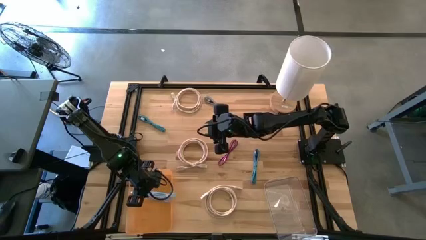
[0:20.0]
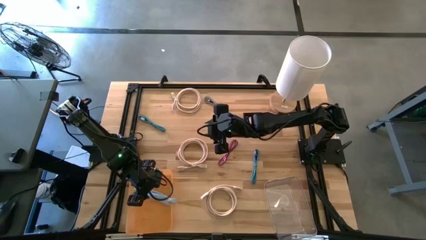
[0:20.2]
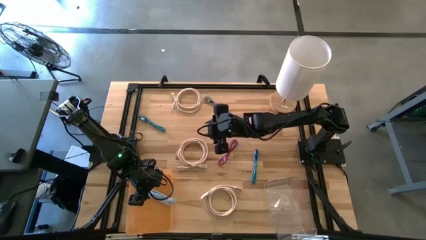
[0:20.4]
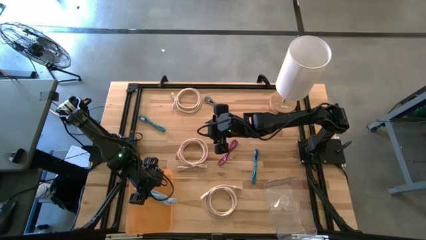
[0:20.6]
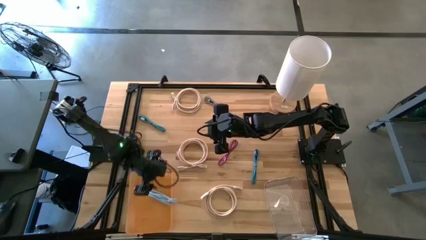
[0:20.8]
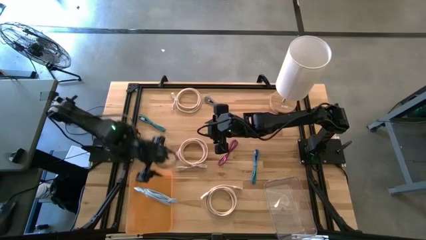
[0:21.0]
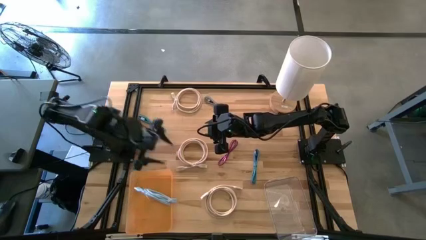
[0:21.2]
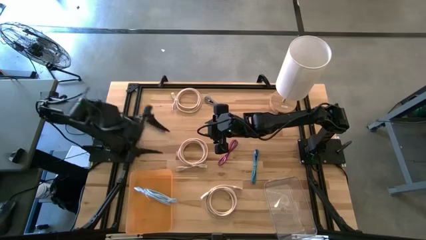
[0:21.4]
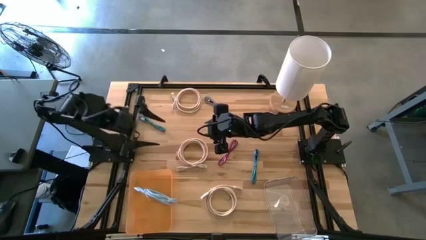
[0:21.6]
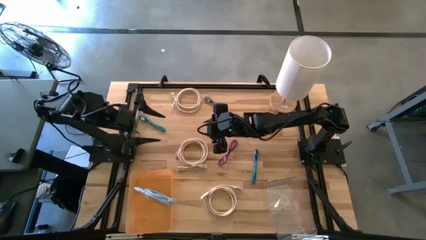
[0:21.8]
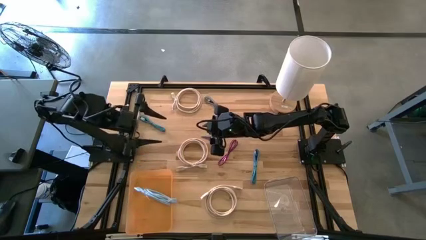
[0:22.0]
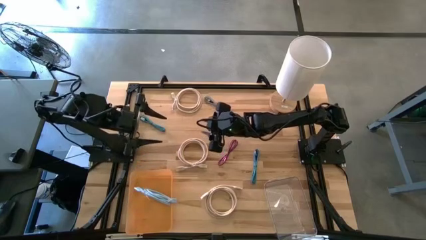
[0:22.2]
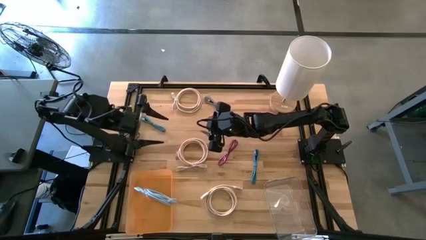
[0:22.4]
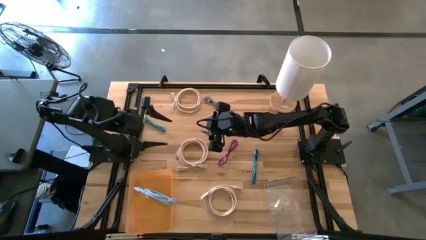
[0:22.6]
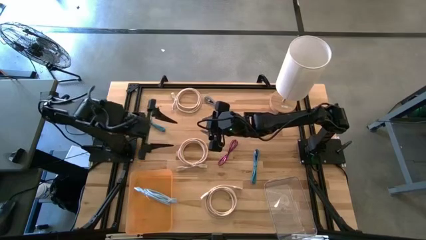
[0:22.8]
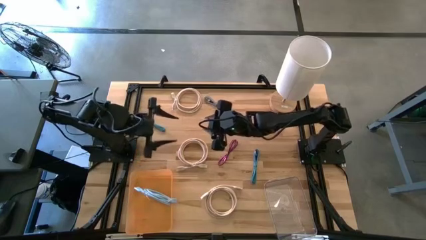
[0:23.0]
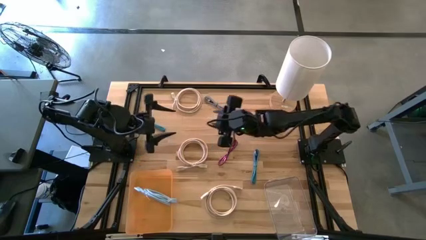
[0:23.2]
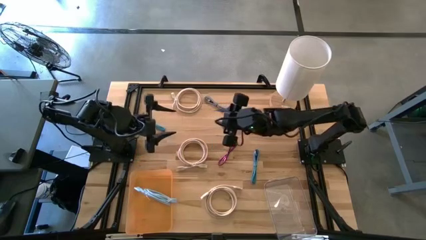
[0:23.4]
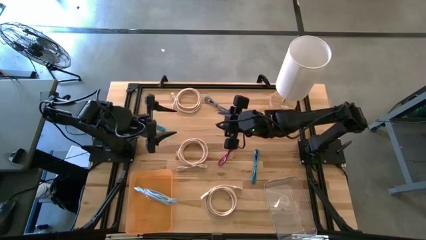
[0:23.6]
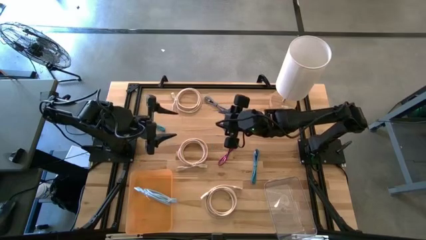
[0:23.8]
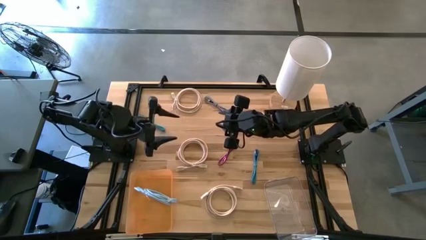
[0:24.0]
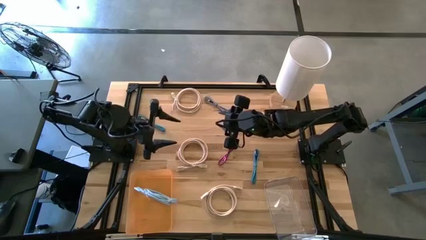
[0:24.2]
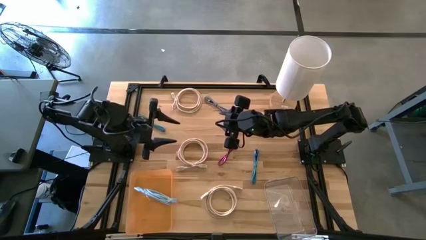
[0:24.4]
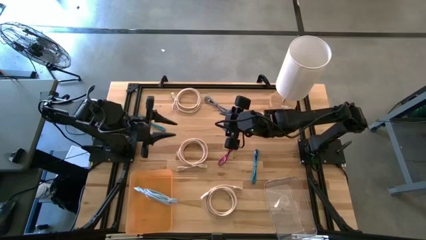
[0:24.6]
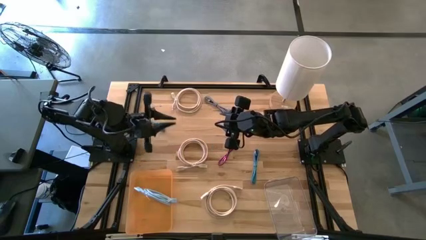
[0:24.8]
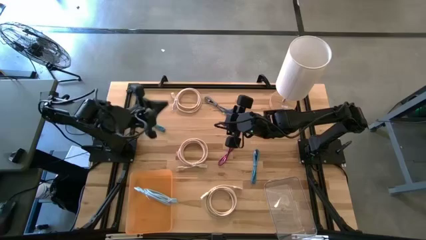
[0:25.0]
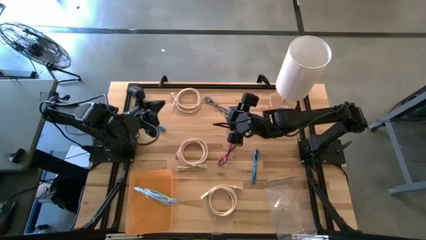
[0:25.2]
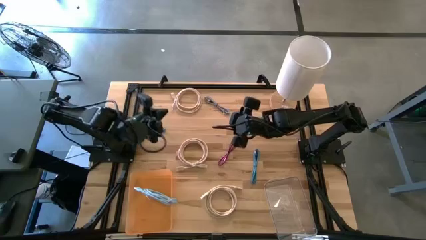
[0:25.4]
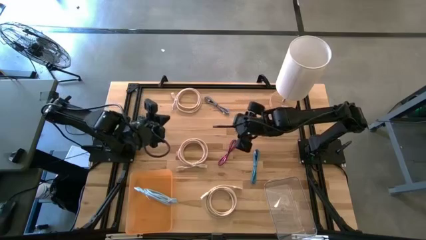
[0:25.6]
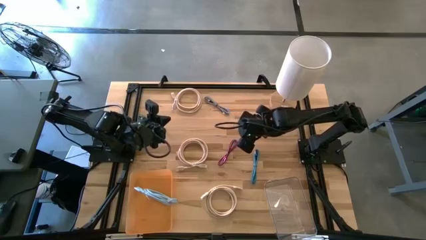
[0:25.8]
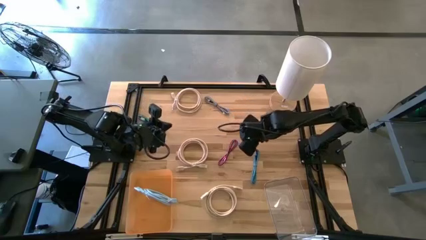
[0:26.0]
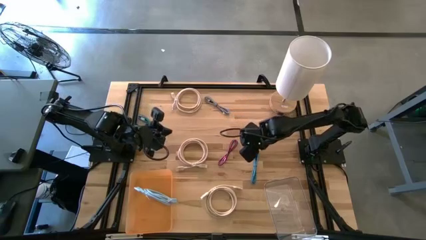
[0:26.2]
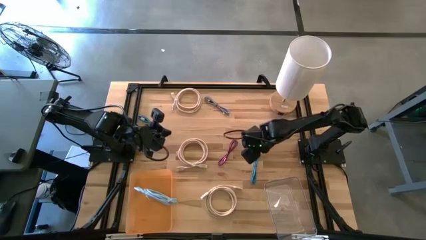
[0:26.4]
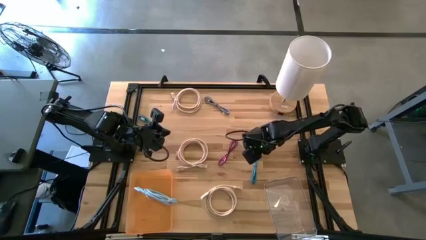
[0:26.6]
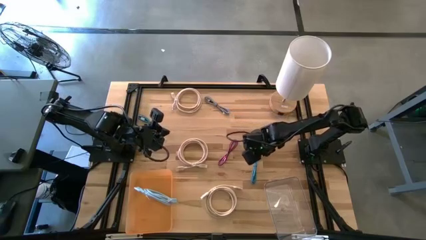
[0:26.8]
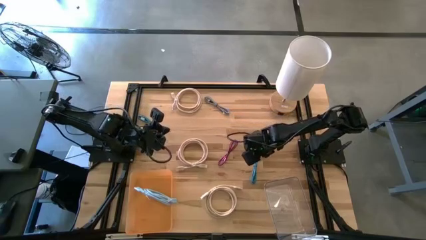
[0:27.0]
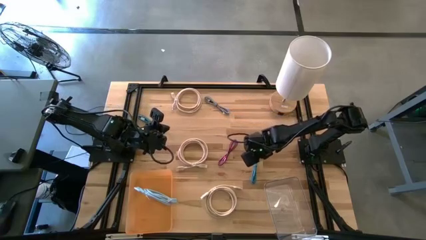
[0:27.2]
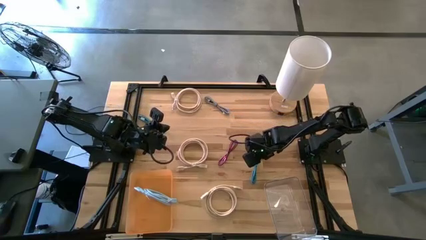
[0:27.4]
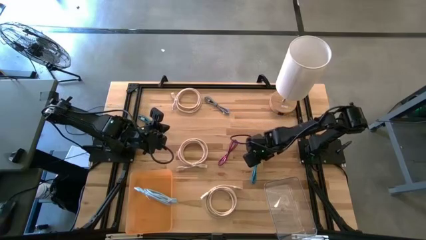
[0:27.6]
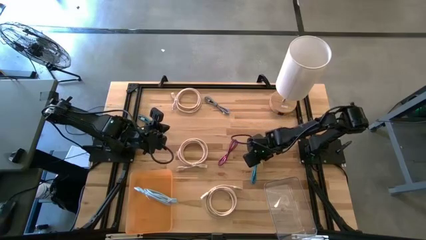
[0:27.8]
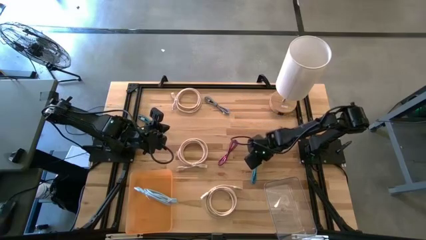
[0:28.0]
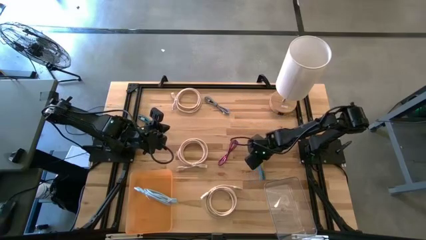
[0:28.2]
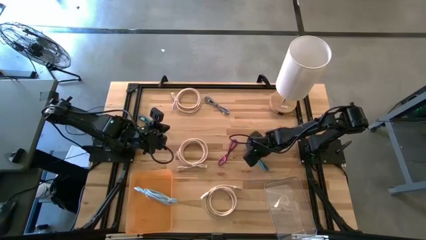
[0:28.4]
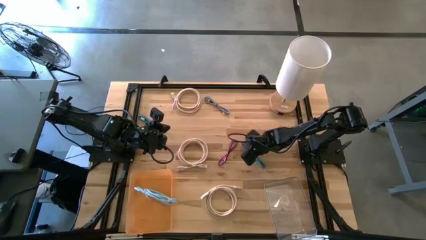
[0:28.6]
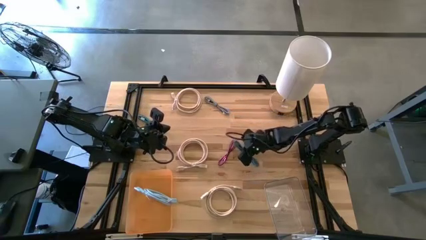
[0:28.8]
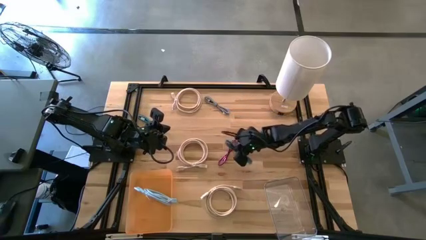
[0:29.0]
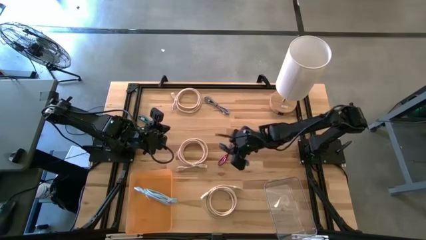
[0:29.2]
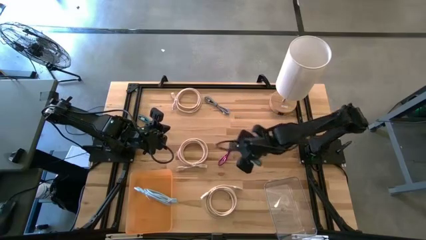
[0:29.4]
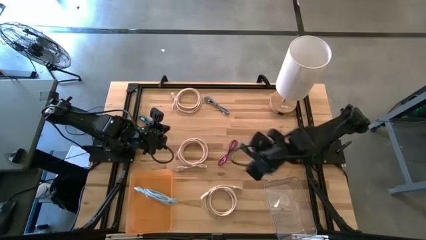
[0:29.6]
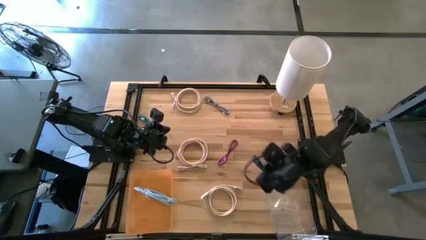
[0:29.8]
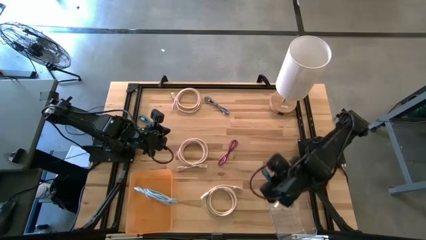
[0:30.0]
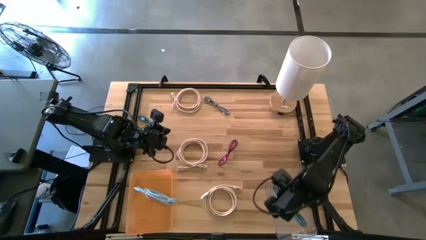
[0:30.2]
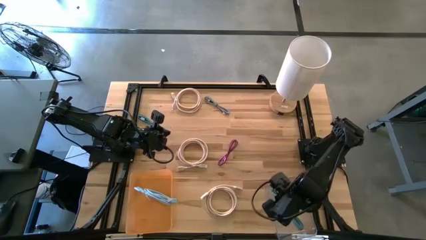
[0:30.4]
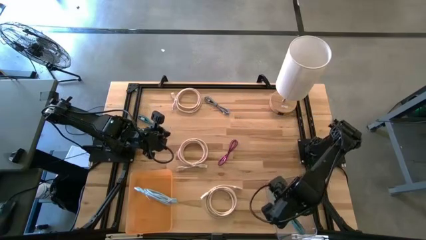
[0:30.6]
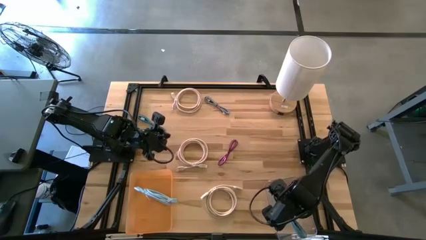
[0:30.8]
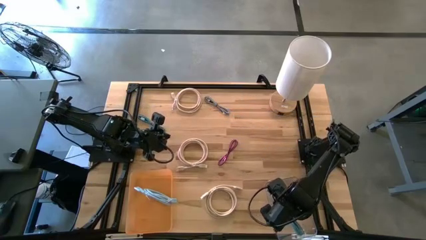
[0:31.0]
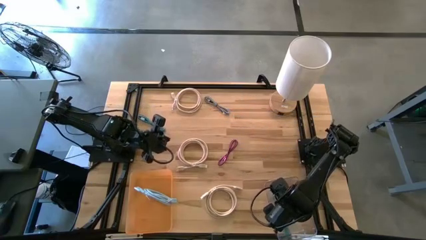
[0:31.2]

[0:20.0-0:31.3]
Task: Pick & Place USB Port
Put the right blue USB cable into the transparent bin

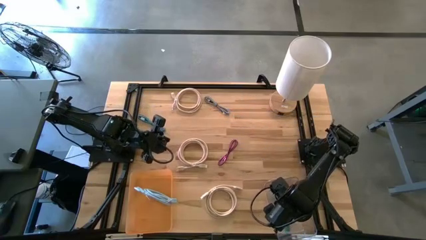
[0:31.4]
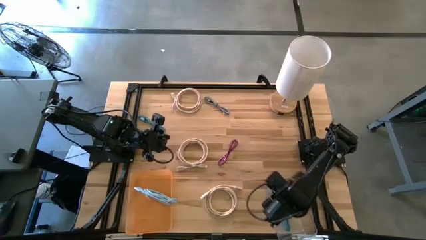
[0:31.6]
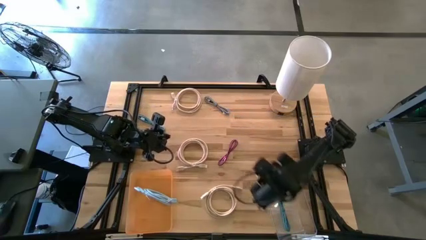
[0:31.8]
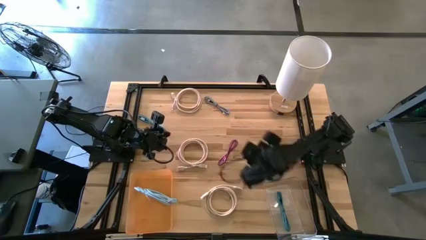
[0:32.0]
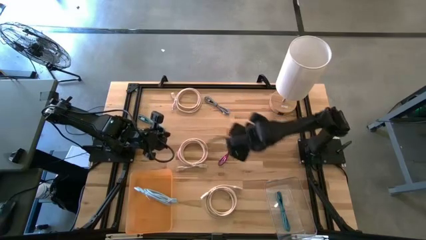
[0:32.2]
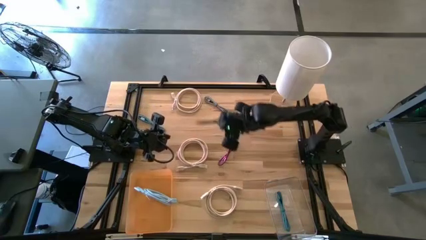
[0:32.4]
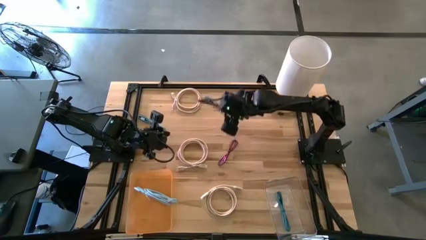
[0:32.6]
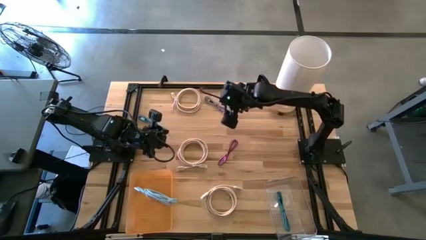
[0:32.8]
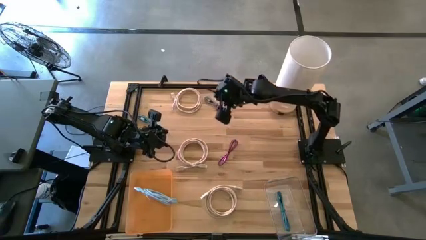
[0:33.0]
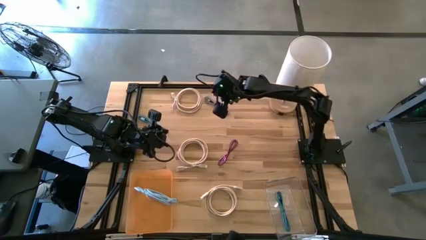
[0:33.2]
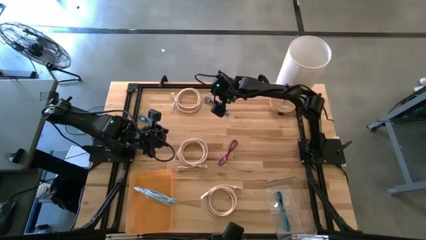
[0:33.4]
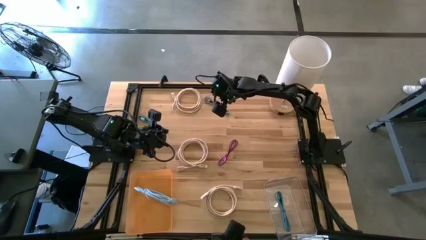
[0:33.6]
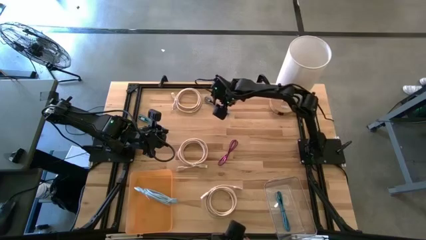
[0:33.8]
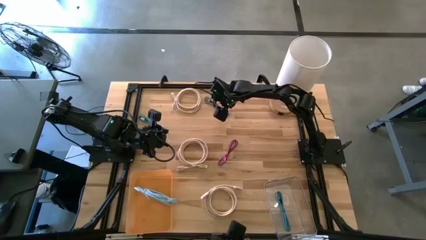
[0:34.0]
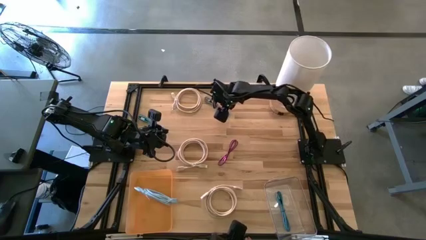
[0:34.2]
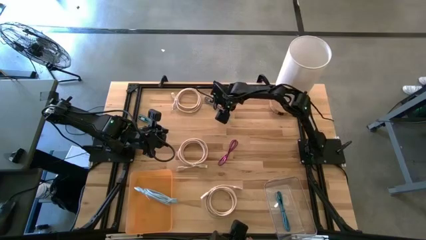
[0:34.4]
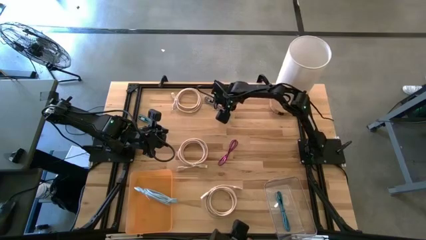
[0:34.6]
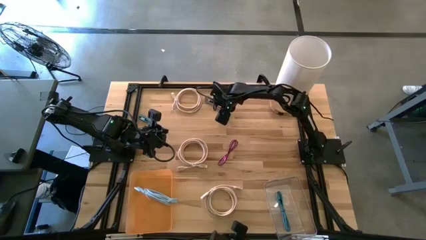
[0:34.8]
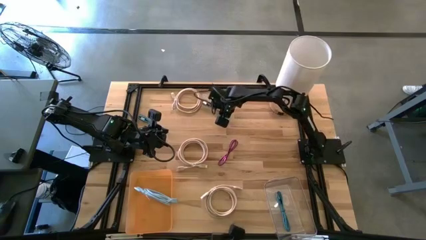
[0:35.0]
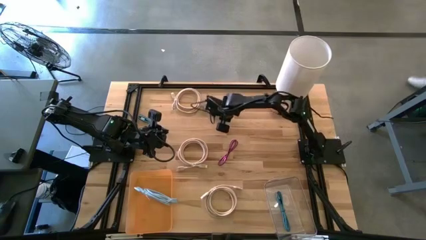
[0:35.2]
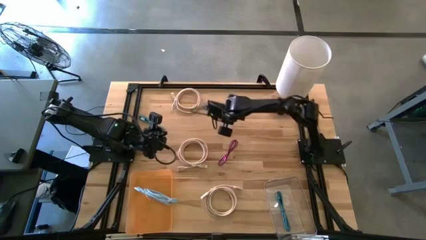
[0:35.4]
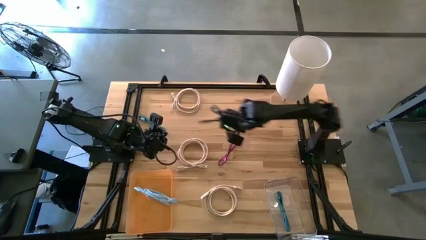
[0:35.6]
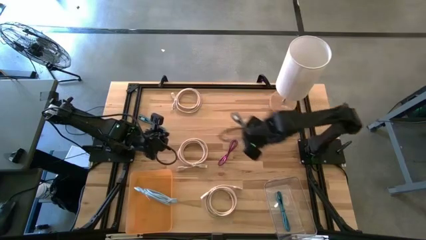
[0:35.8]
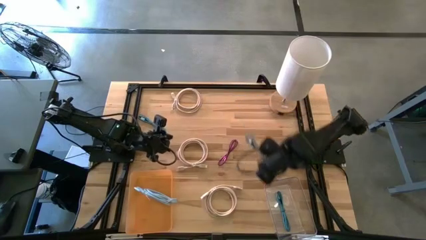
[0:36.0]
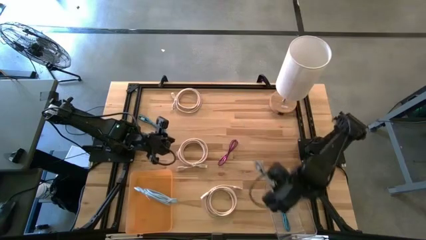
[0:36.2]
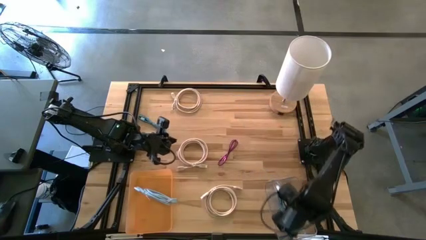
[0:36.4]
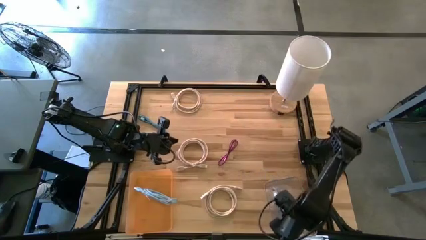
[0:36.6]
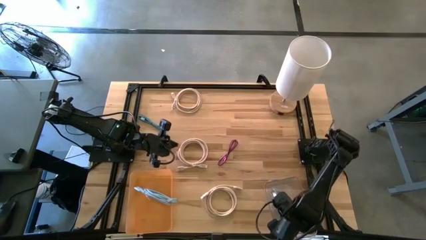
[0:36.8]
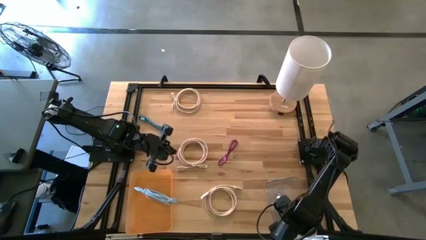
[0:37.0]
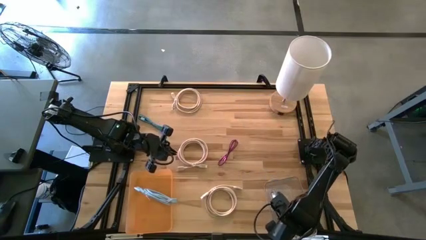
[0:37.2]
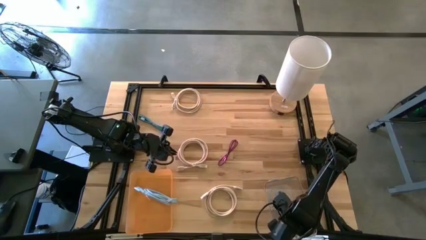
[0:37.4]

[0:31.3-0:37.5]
Put the white USB cable into the transparent bin
